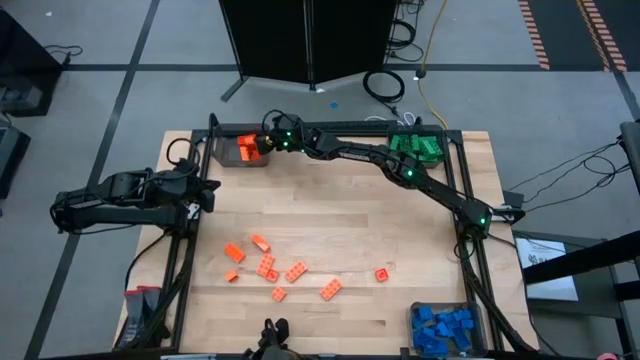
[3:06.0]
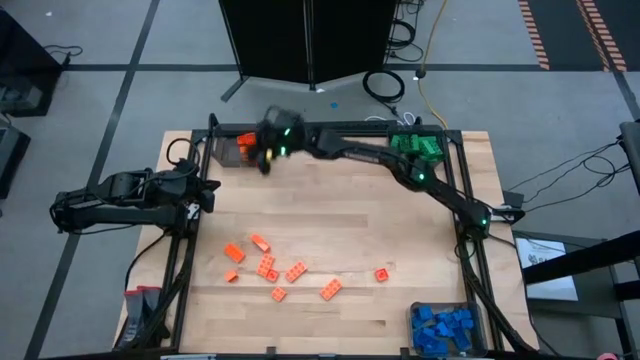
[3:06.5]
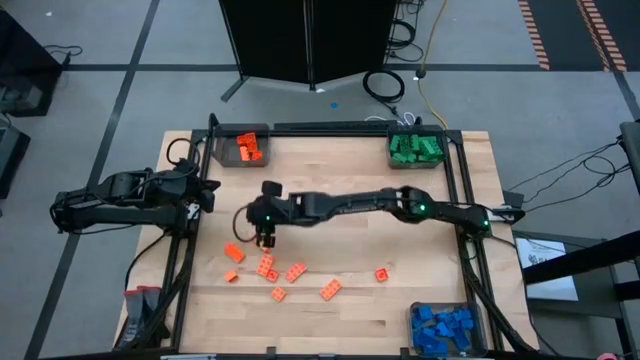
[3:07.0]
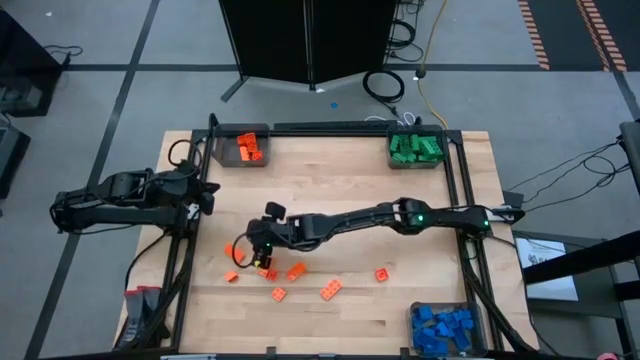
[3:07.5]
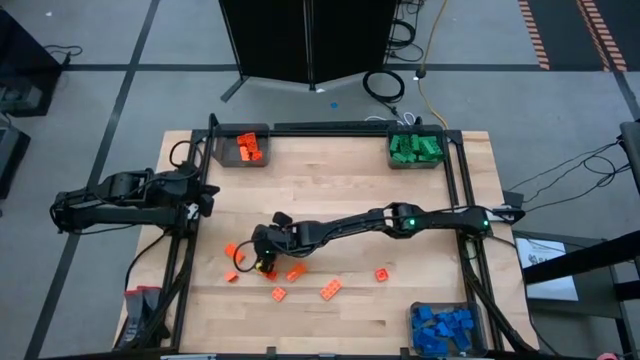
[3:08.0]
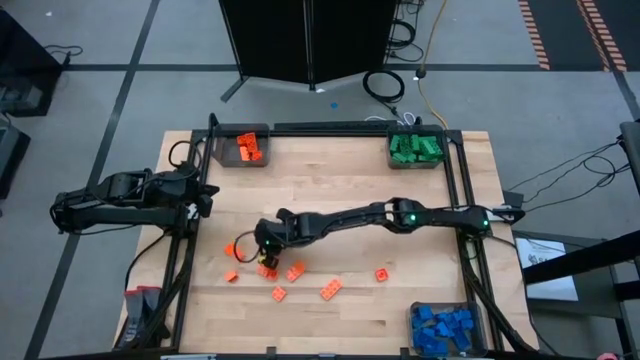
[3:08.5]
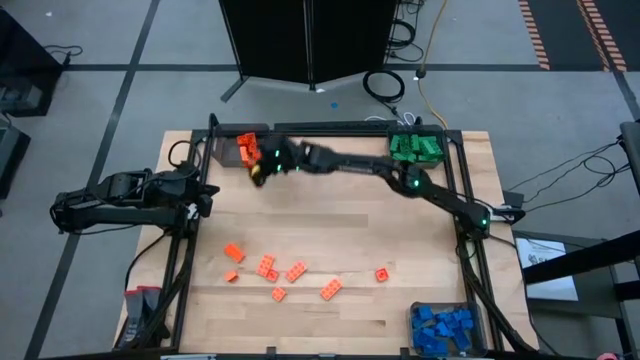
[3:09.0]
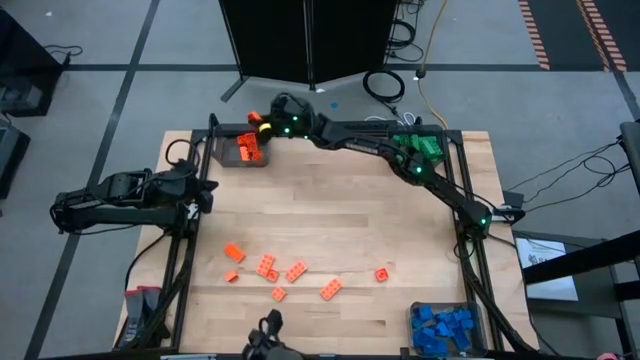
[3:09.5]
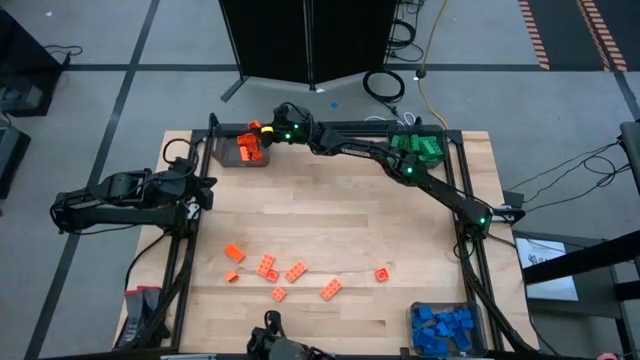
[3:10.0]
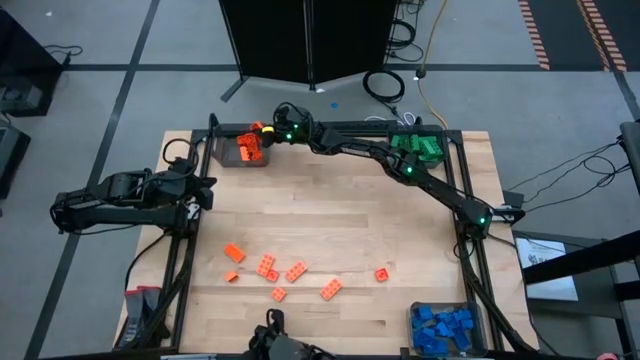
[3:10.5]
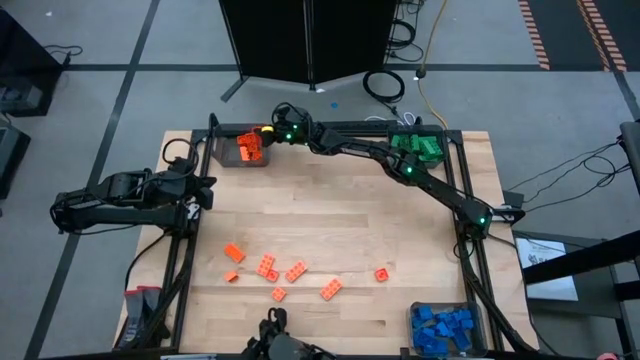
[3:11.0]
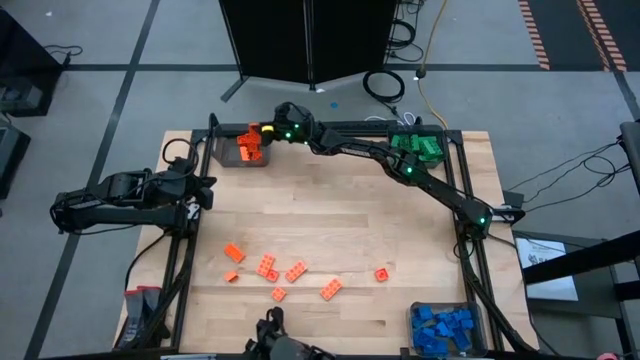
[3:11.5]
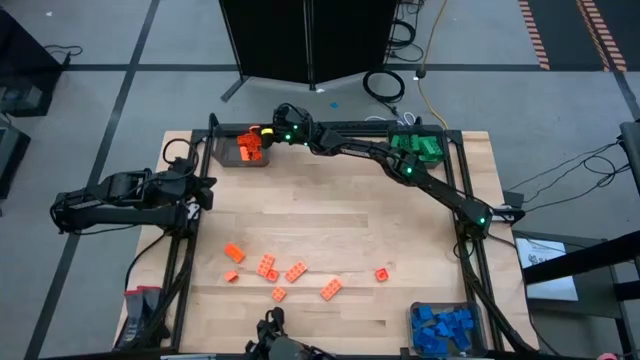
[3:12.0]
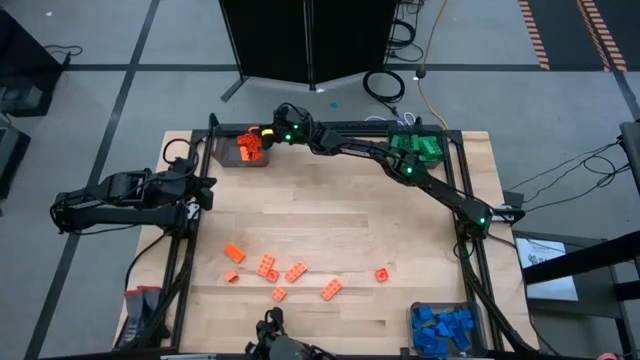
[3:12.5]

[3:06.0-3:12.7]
Task: Sort blocks
Put the orange game piece into the top left black bin

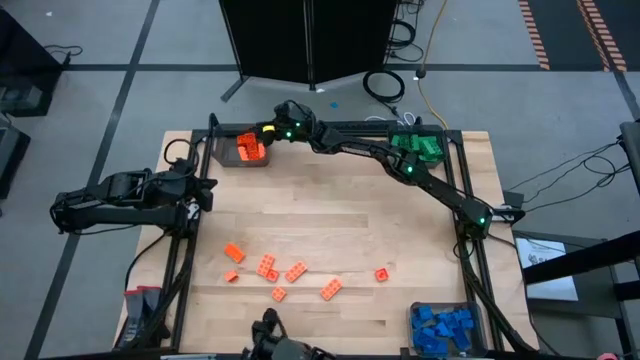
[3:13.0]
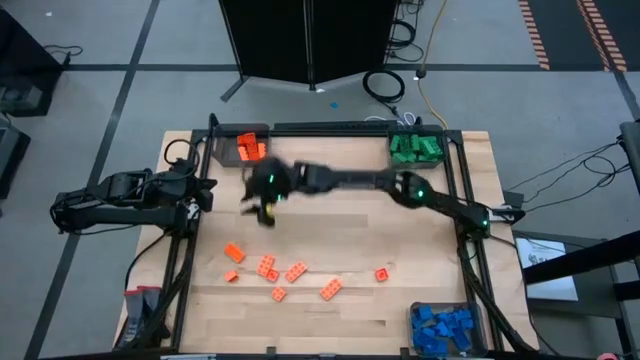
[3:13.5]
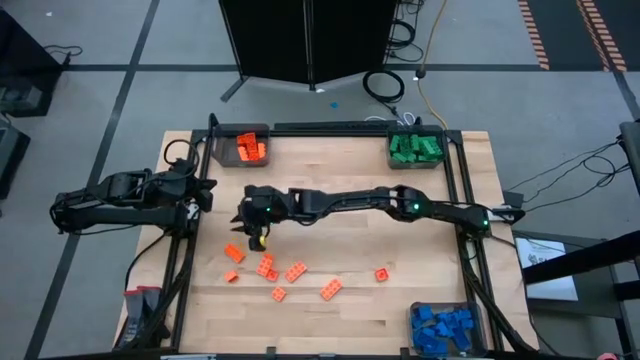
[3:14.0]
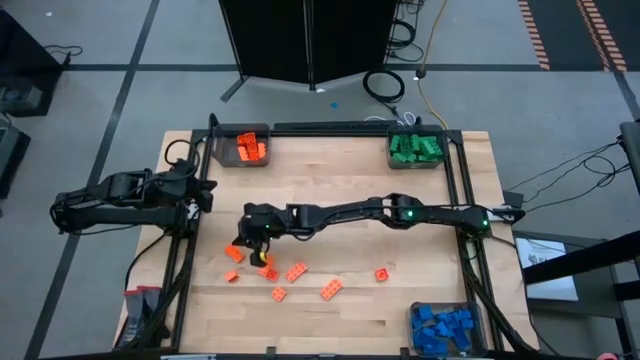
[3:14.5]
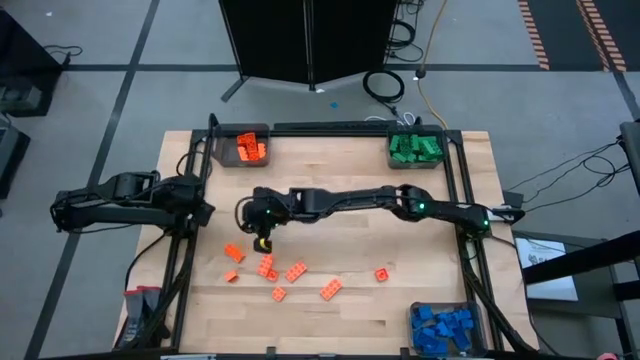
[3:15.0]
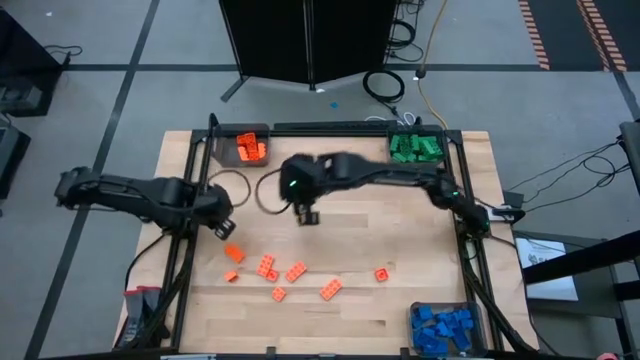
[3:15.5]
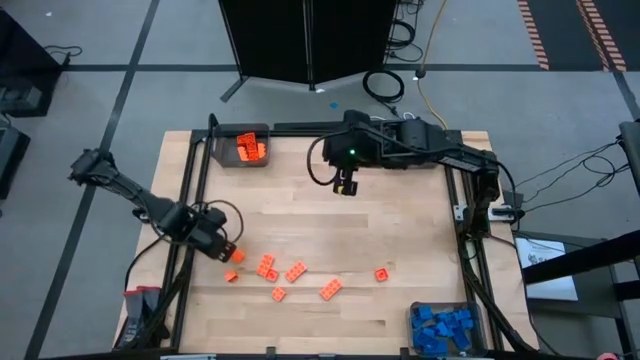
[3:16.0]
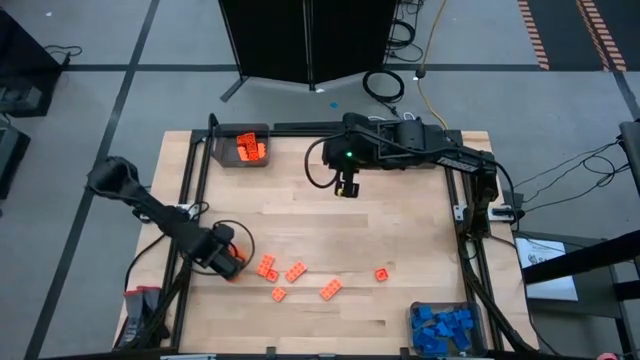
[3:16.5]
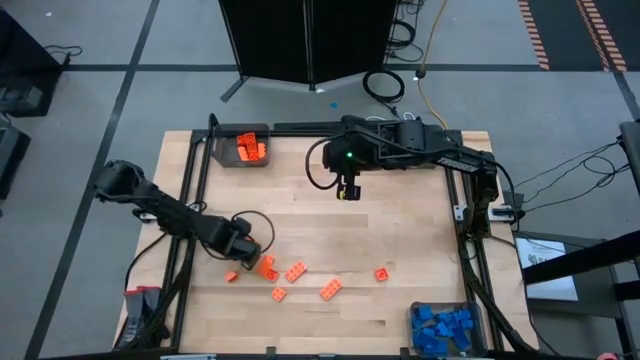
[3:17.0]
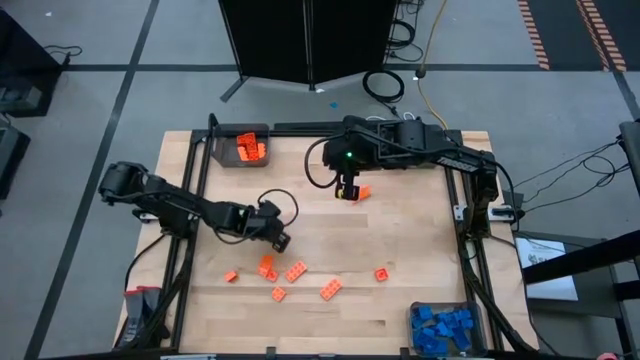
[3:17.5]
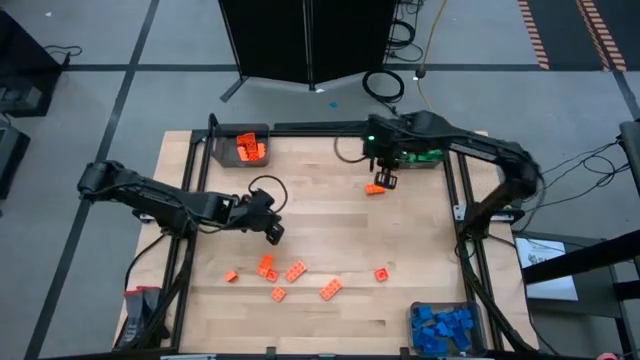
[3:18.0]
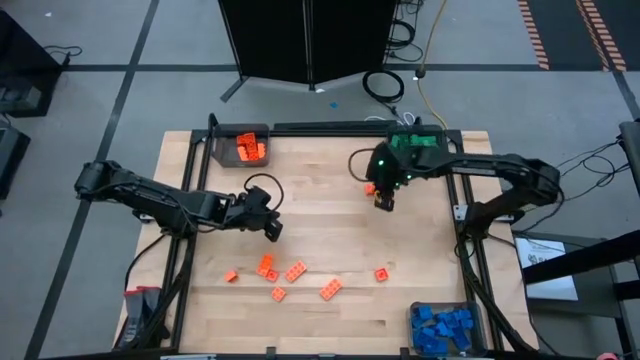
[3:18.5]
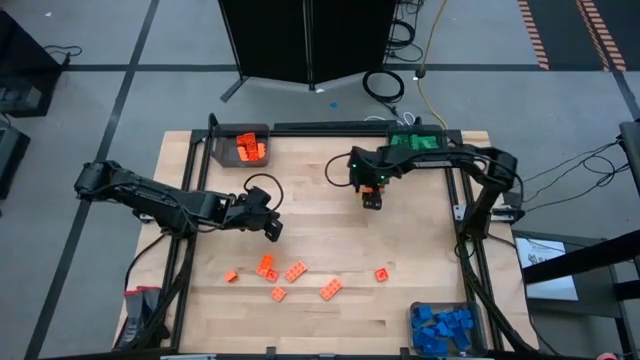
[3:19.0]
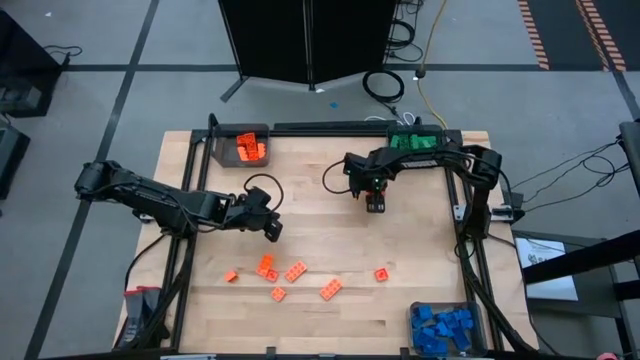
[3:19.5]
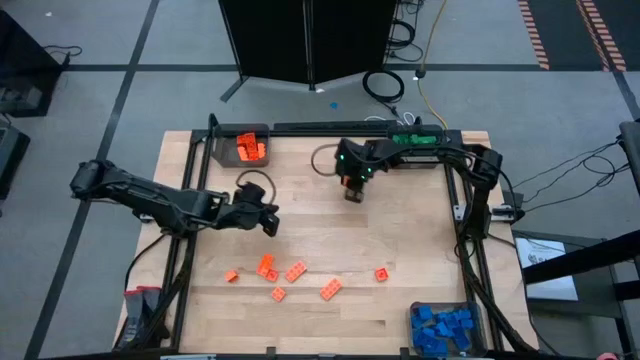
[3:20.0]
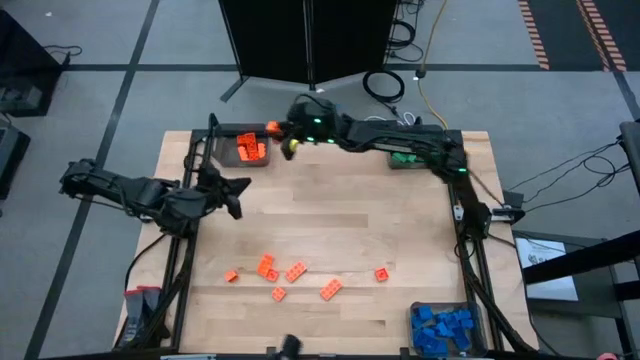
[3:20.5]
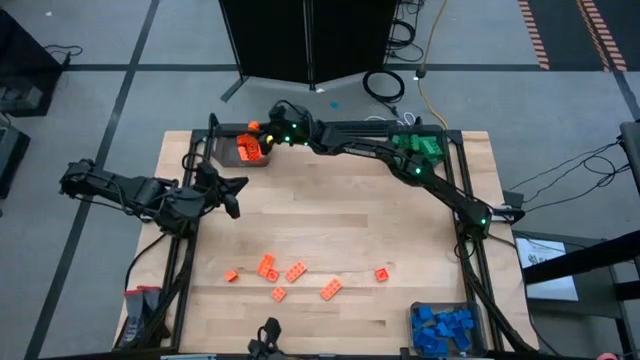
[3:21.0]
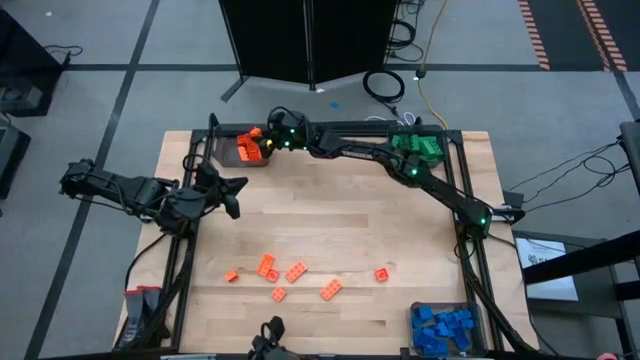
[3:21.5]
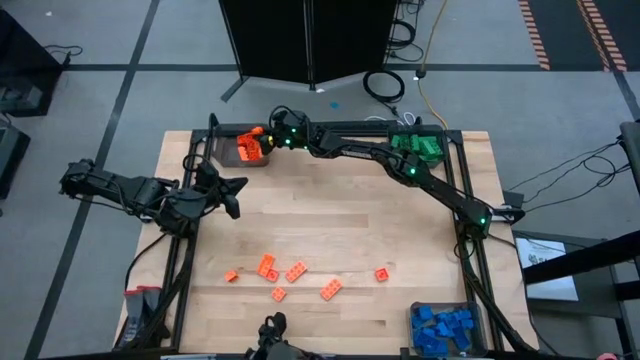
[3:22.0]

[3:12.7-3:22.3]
Put the orange game piece into the top left black bin

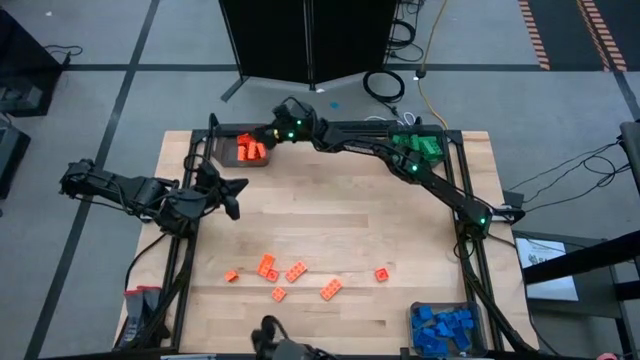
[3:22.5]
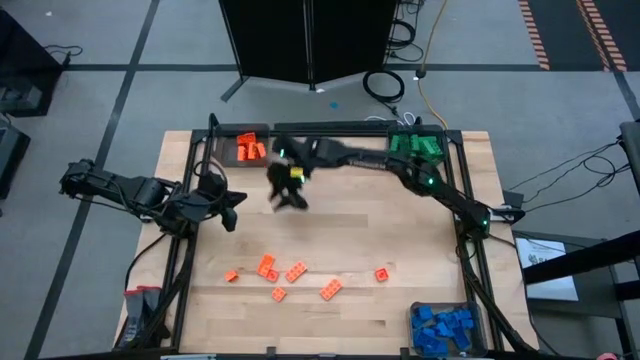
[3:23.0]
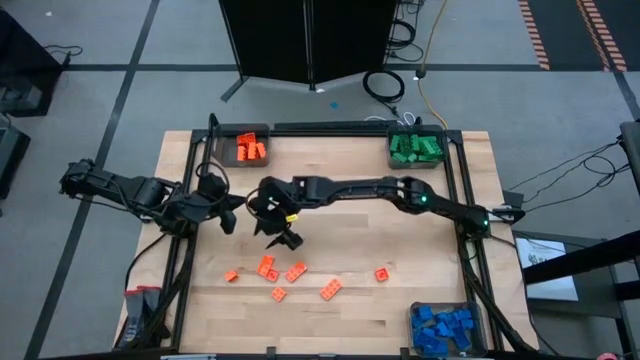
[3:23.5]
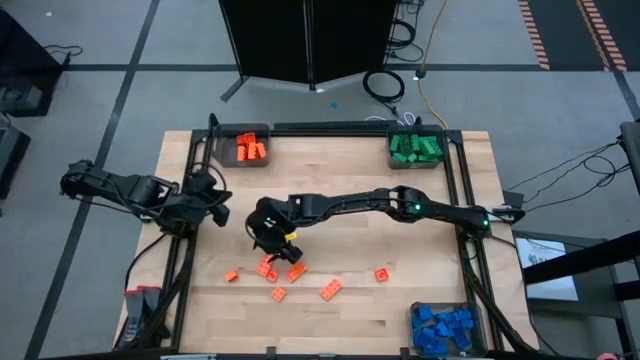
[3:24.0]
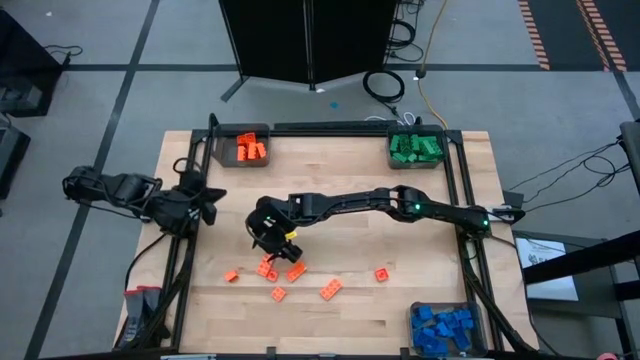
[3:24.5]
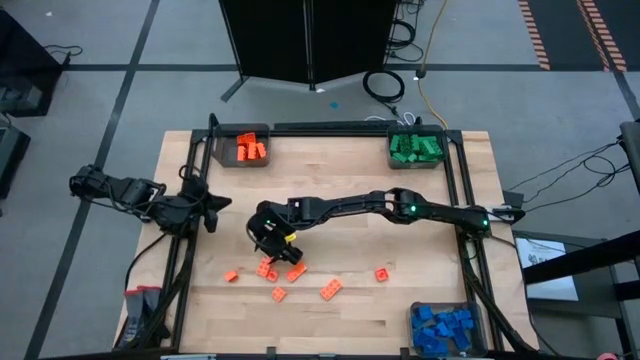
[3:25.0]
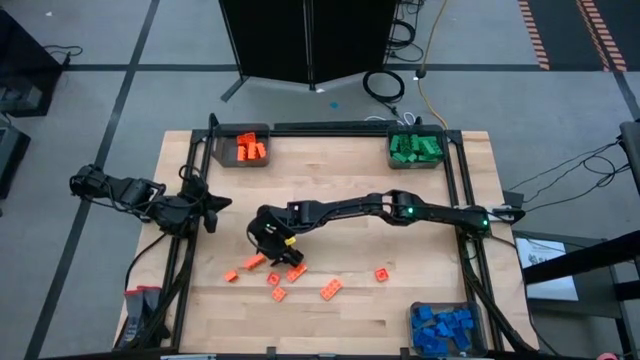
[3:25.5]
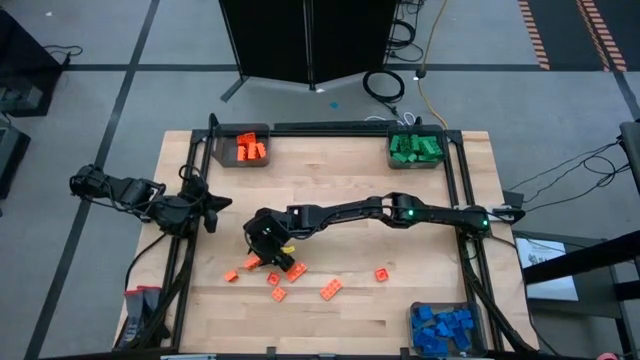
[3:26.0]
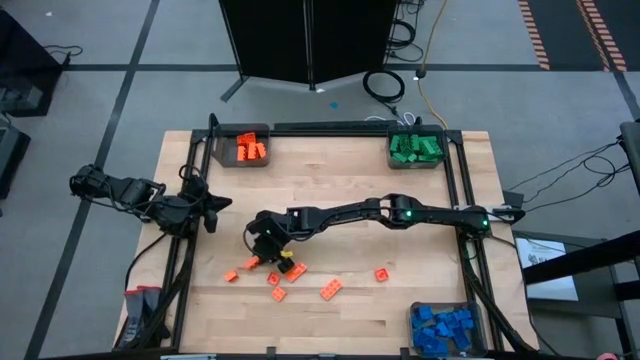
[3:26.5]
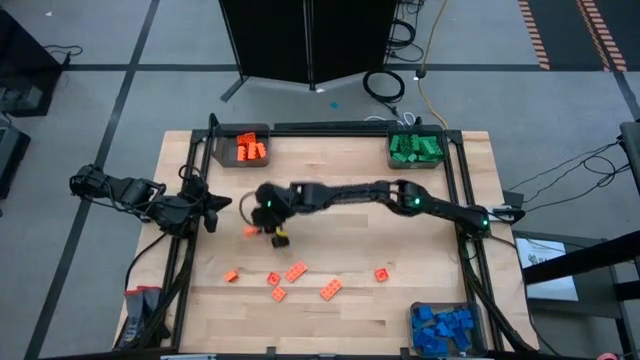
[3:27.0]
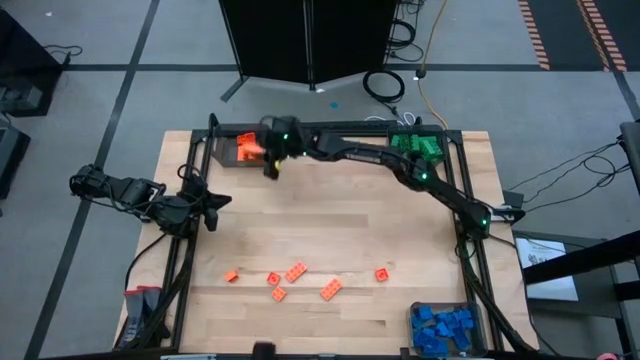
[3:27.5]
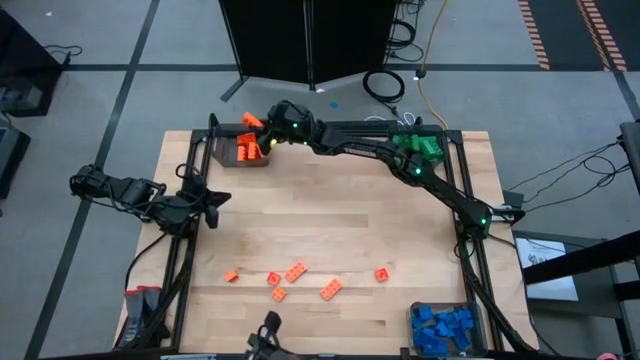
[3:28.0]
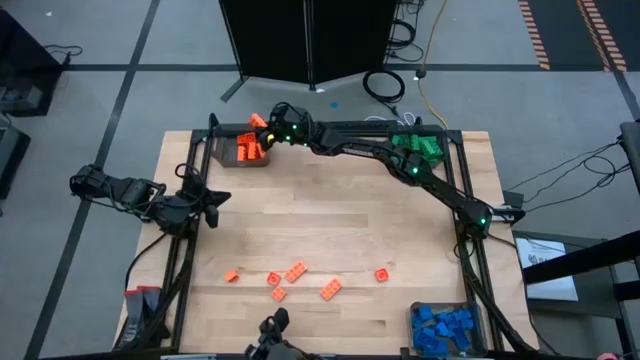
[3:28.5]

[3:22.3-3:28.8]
Put the orange game piece into the top left black bin
